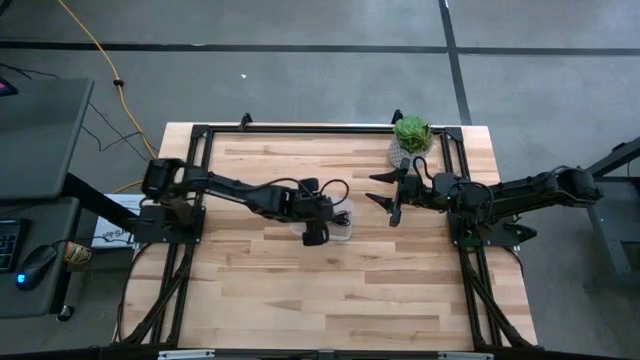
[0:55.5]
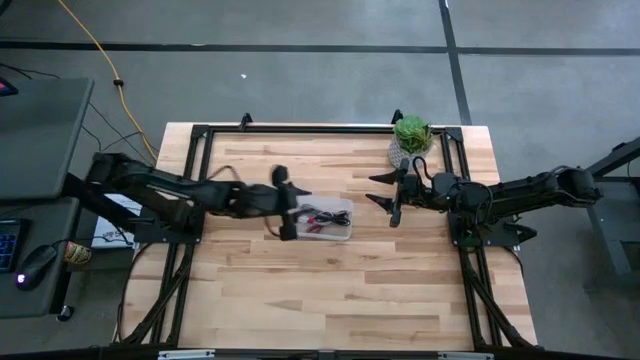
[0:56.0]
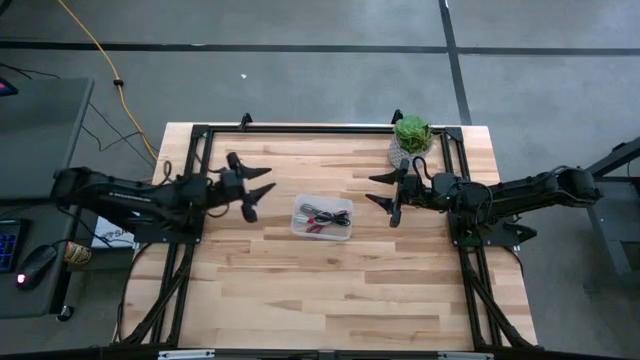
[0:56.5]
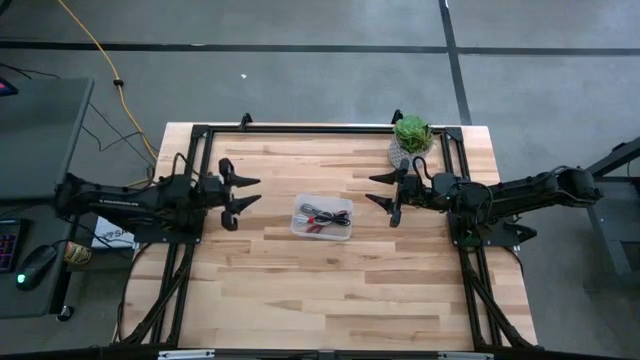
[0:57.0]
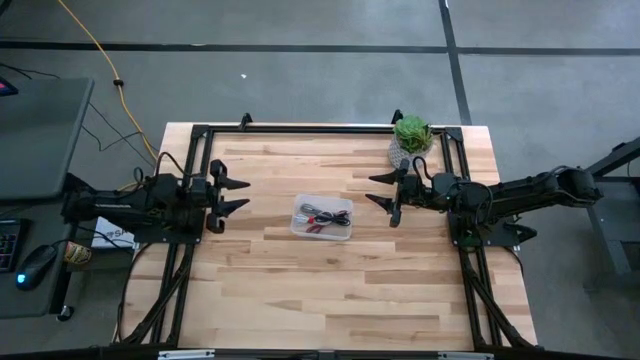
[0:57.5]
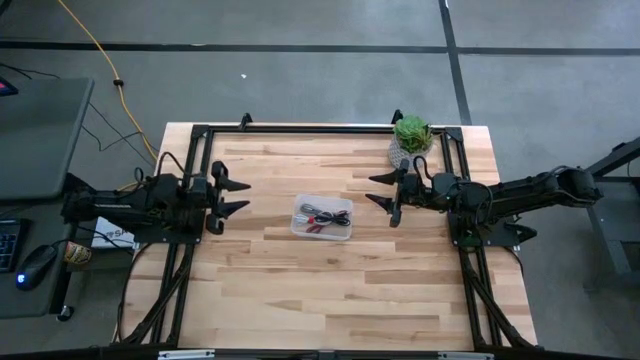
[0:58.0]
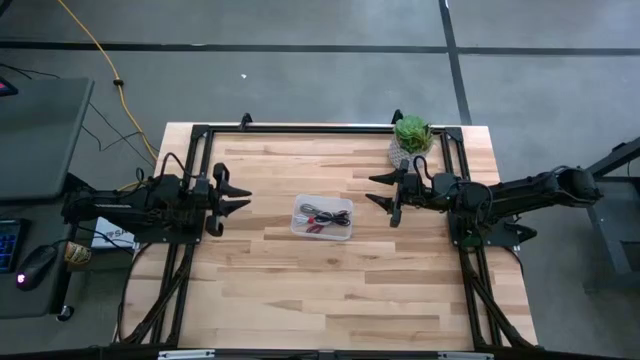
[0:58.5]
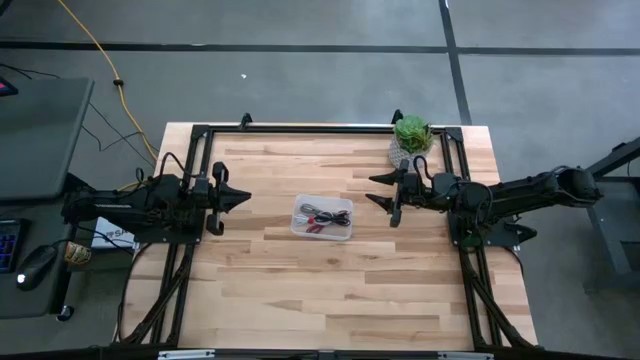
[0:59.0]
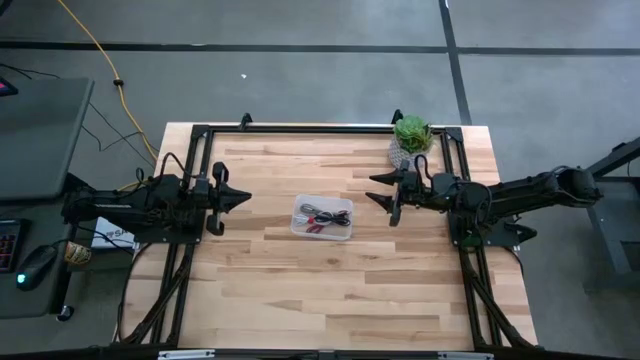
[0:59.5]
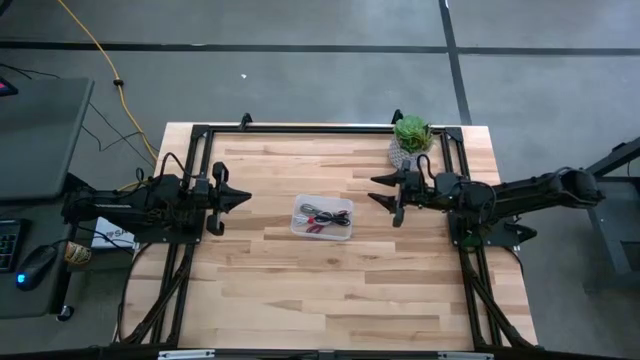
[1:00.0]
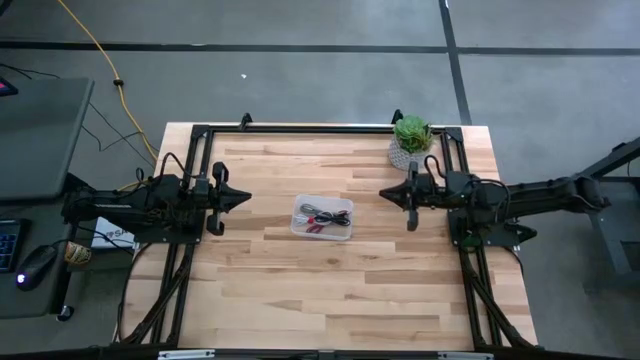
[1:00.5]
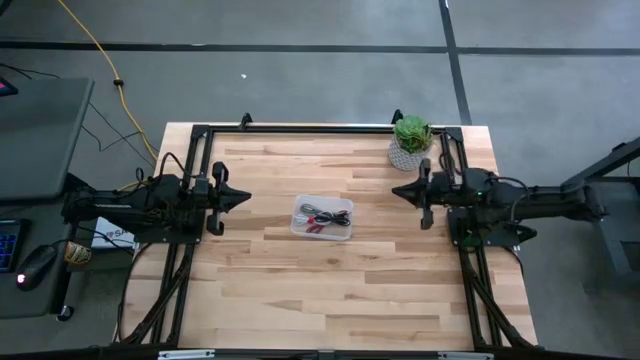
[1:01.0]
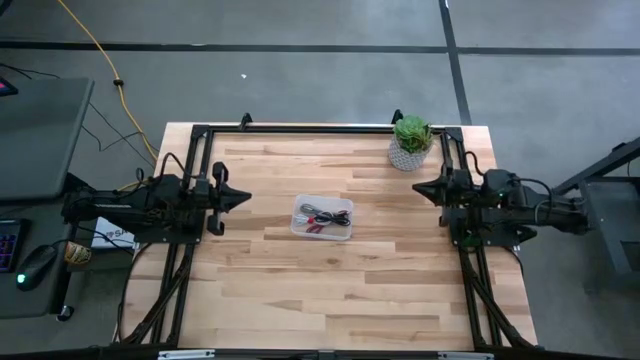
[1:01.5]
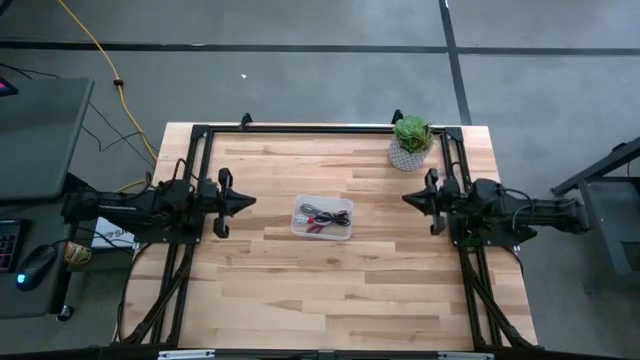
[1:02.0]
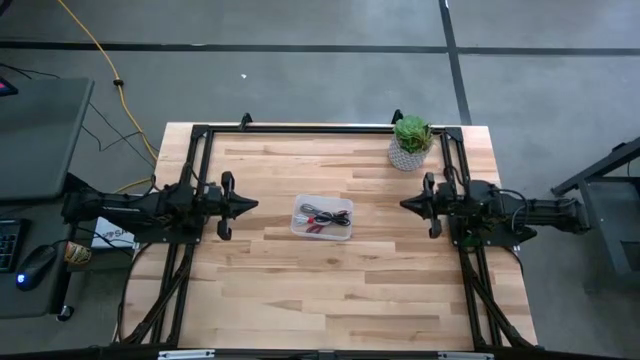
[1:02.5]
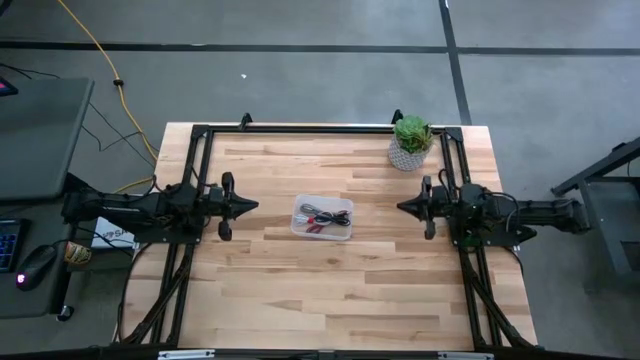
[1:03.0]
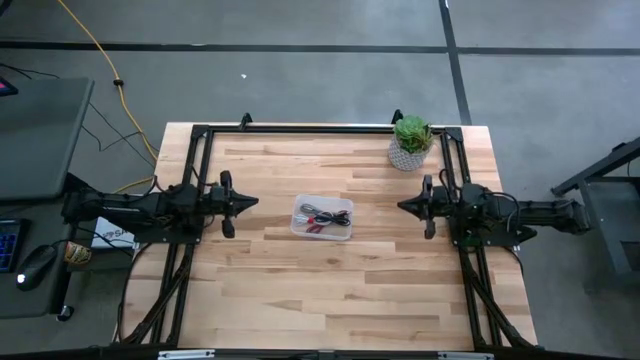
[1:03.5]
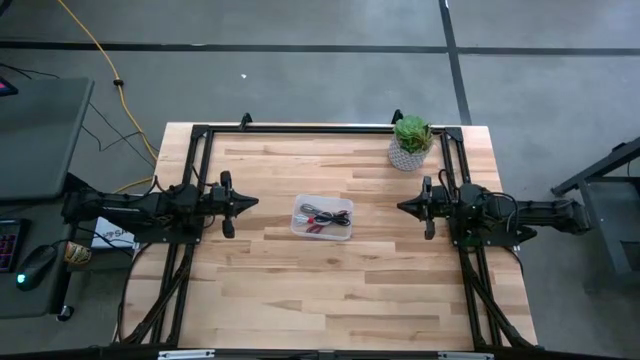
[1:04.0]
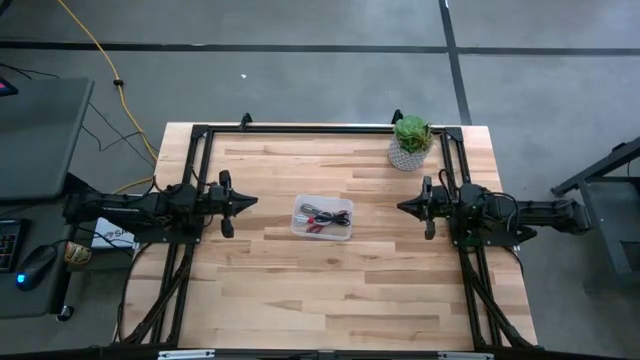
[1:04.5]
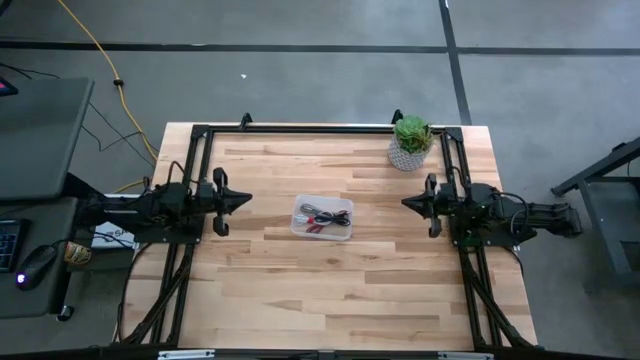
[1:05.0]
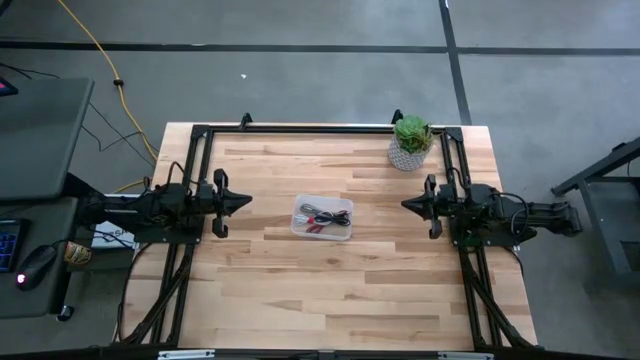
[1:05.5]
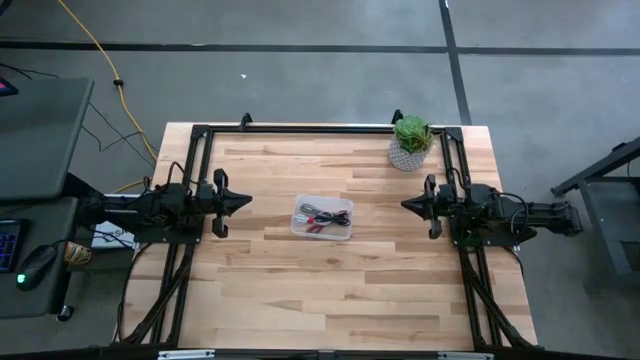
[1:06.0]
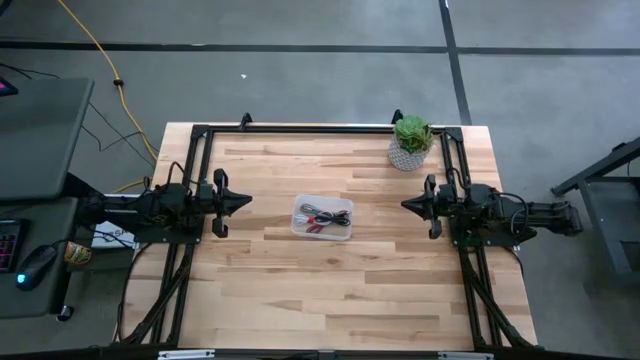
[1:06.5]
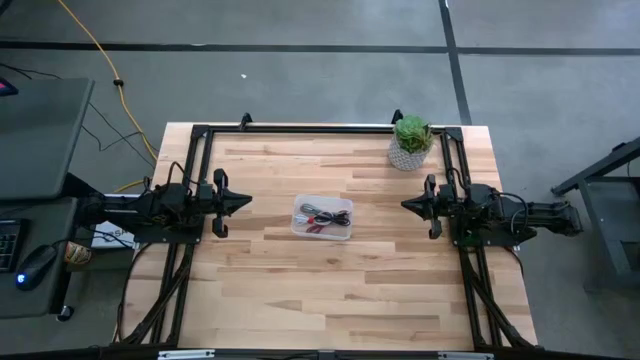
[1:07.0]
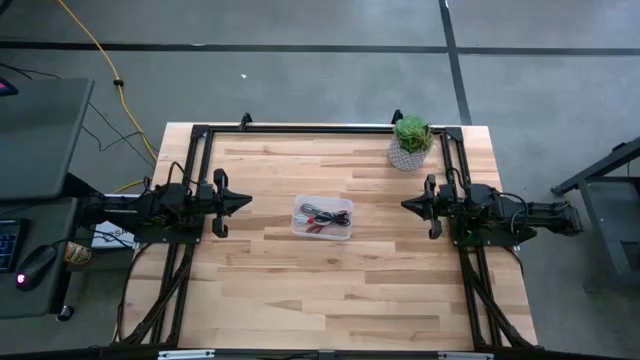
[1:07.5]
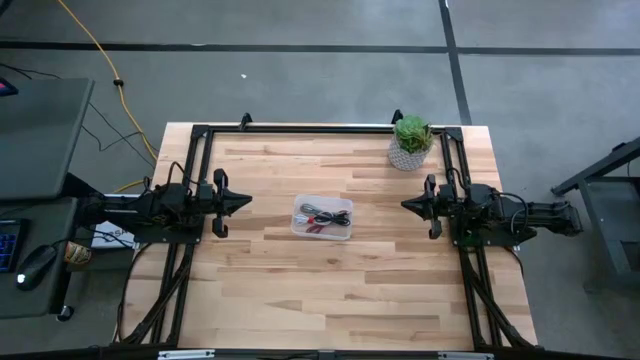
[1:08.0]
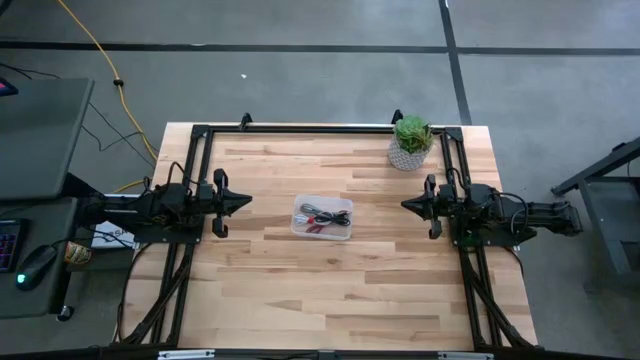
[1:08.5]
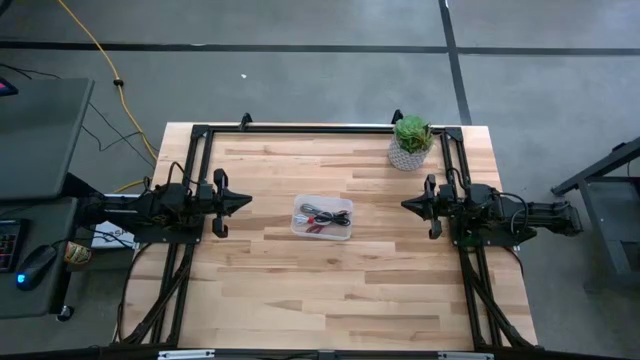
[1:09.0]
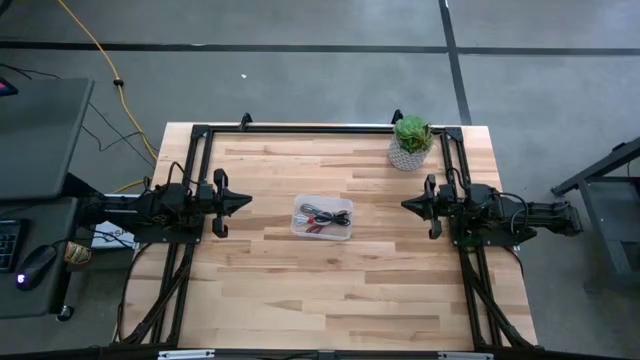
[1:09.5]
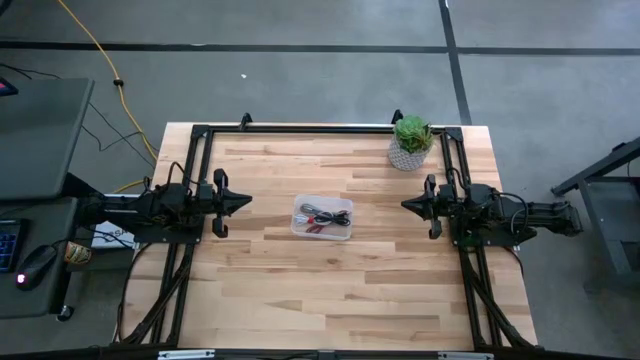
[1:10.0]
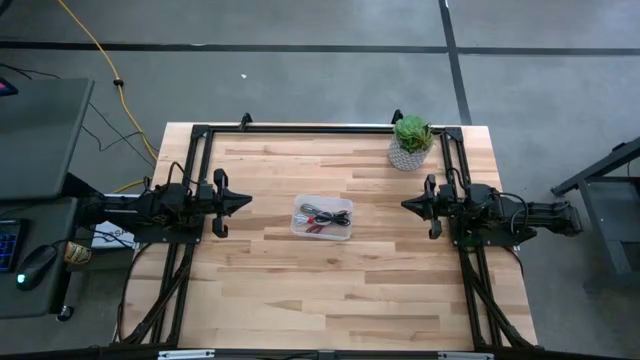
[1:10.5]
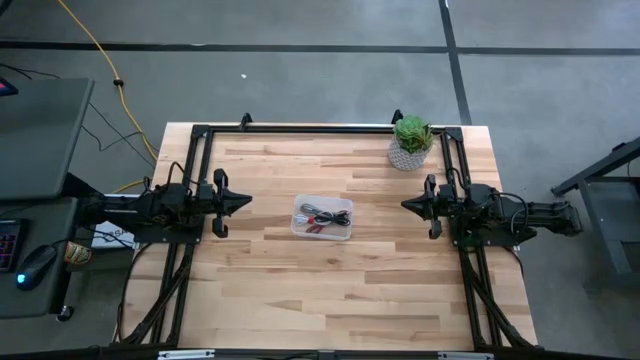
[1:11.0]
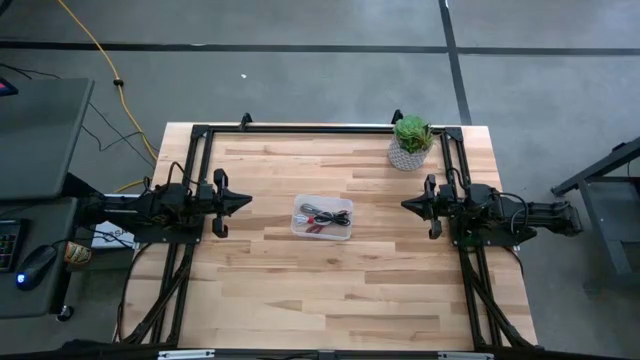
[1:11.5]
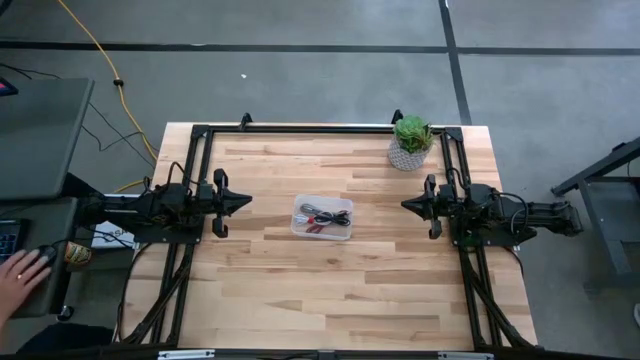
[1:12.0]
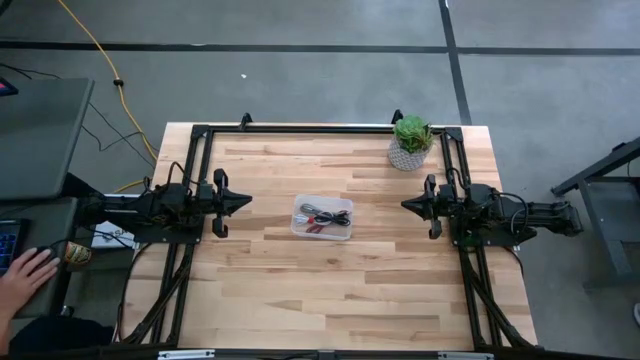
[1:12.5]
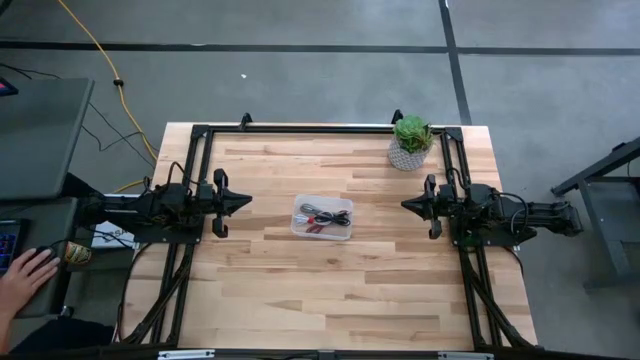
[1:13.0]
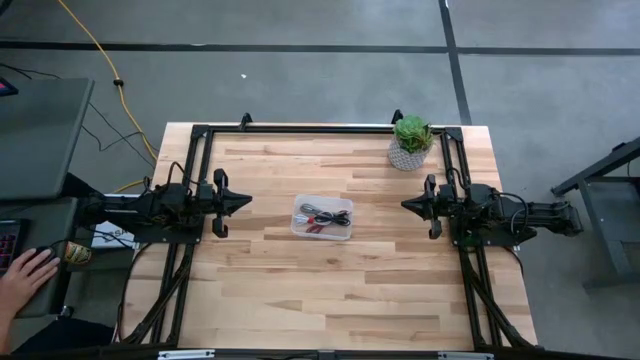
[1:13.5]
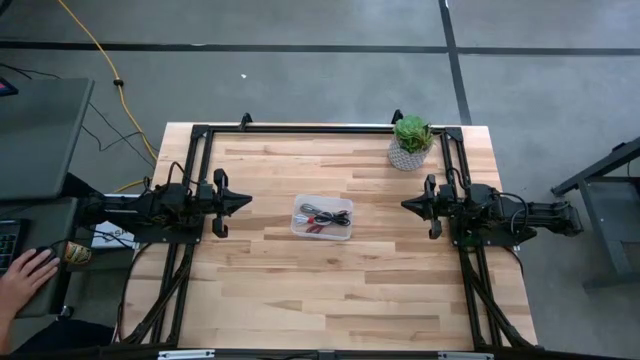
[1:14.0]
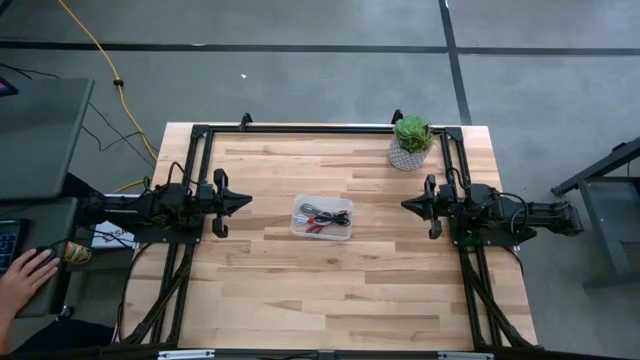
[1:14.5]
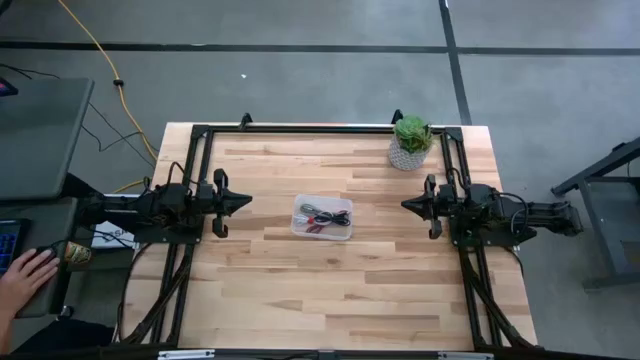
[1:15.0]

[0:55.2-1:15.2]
Task: Pick and place USB-C Cables
Return to Home Position

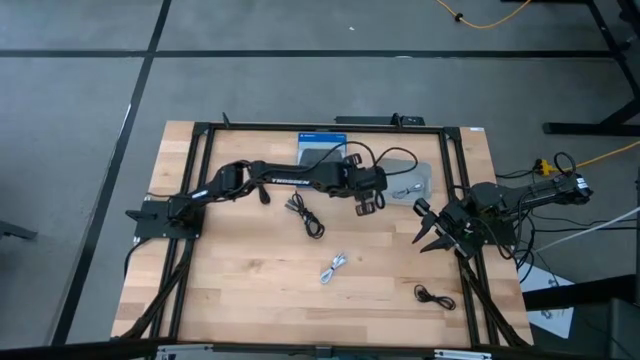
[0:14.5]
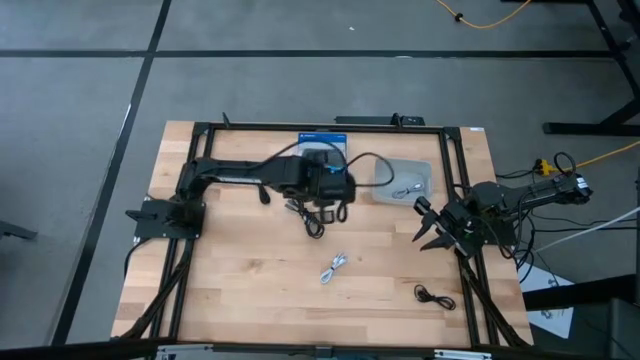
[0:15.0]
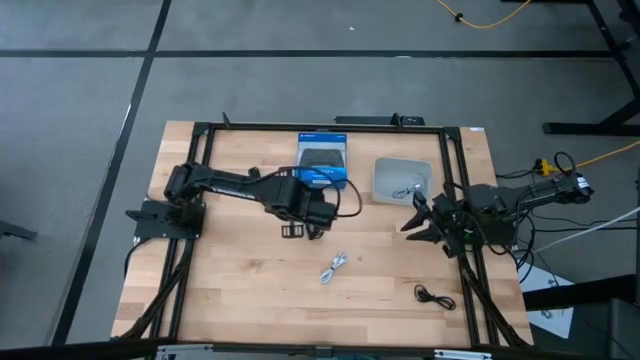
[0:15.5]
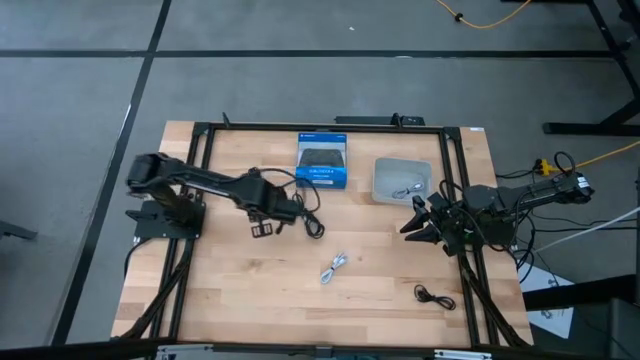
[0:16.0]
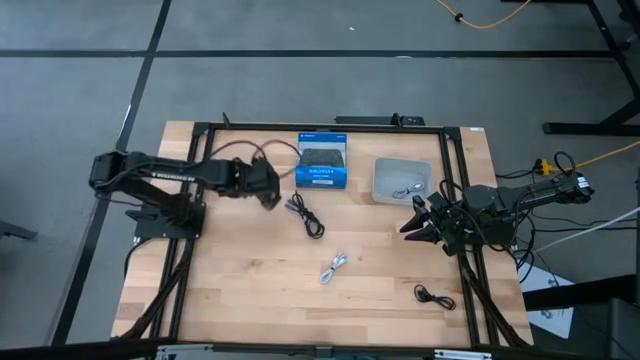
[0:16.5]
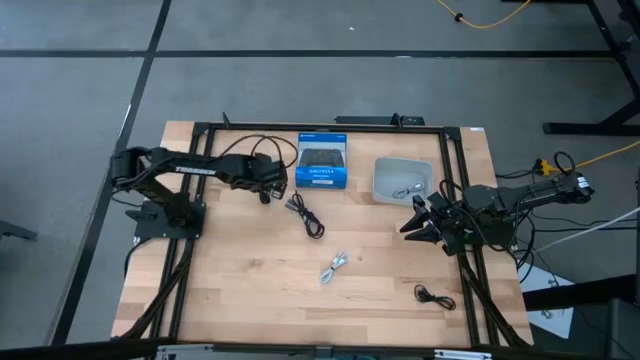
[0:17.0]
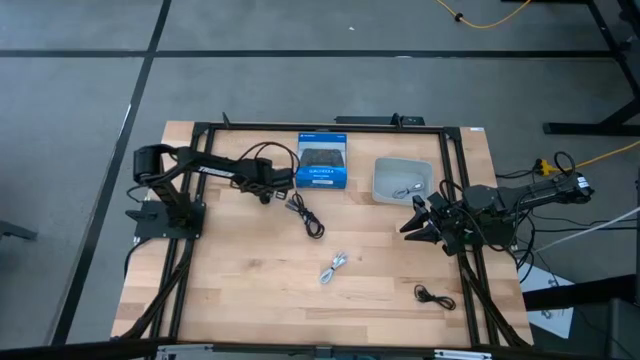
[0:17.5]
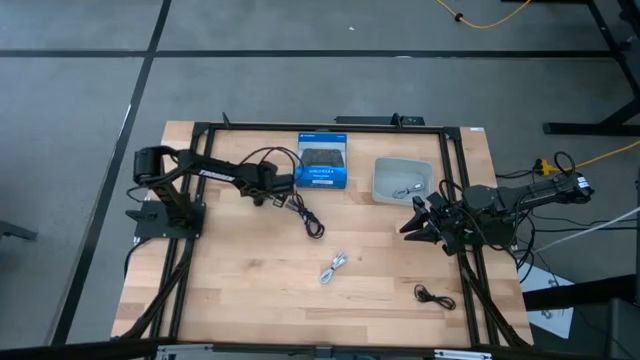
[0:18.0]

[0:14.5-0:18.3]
Task: Pick and place USB-C Cables
Put the top black charger cable into the gray bin
